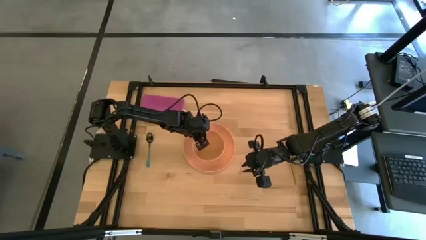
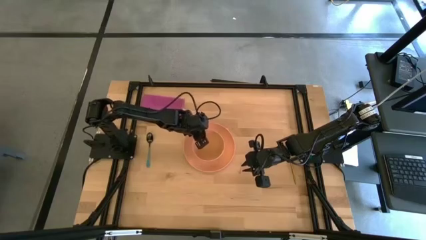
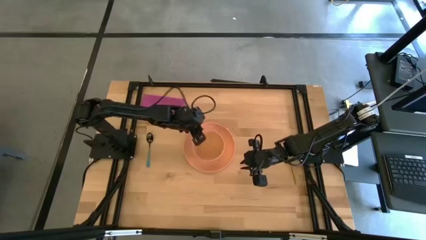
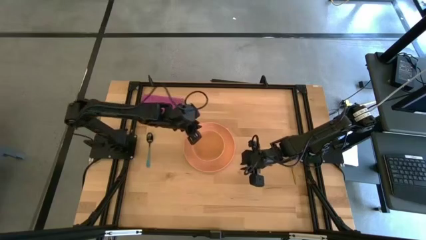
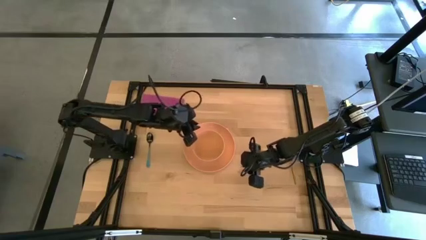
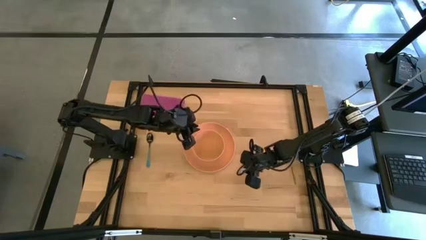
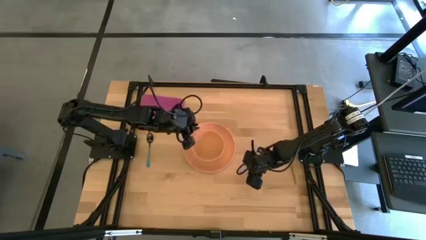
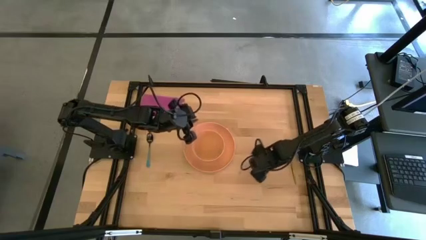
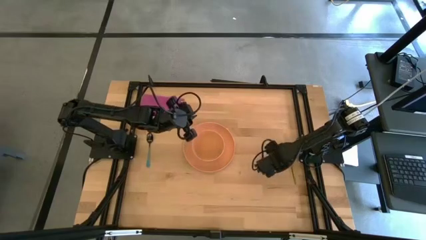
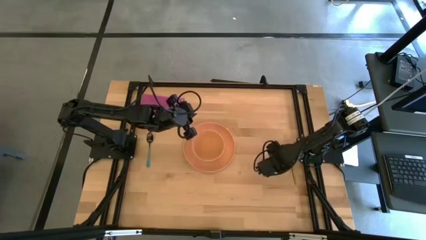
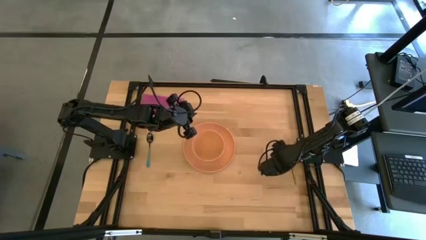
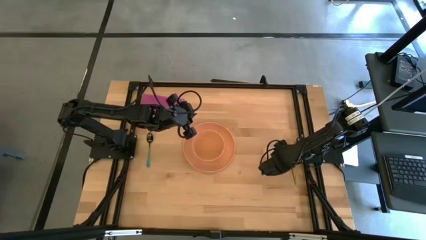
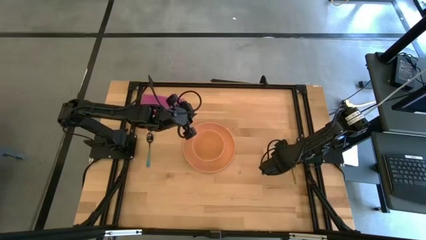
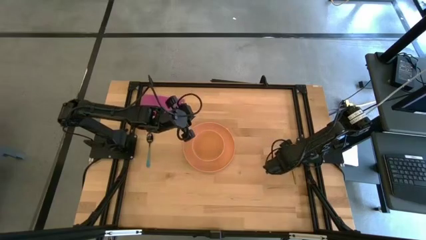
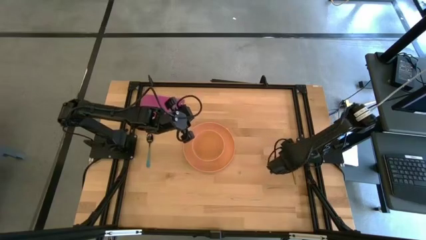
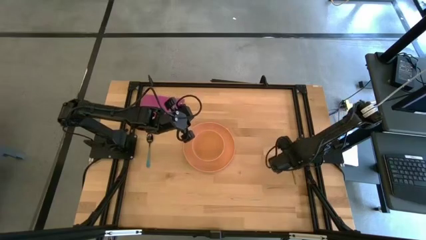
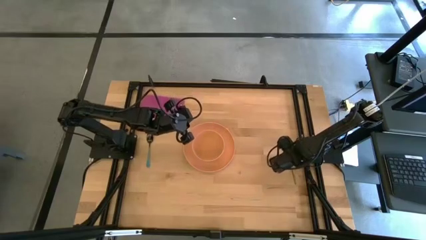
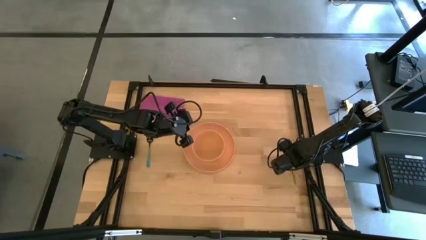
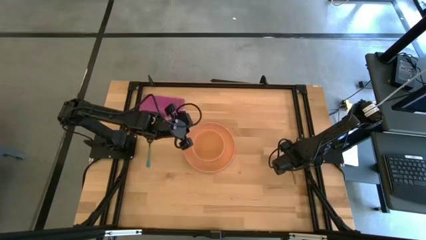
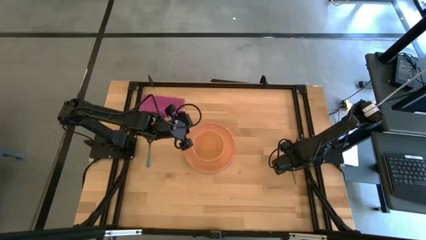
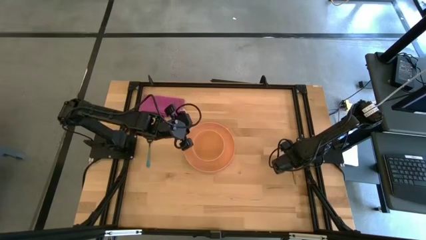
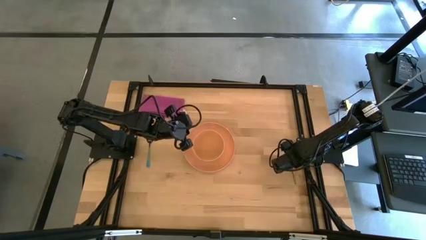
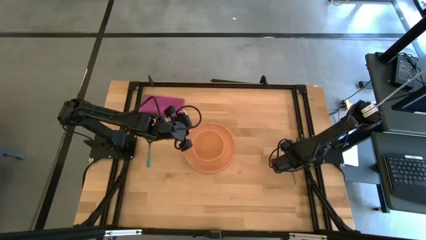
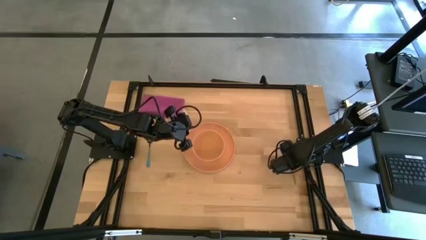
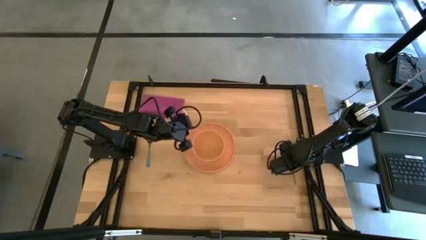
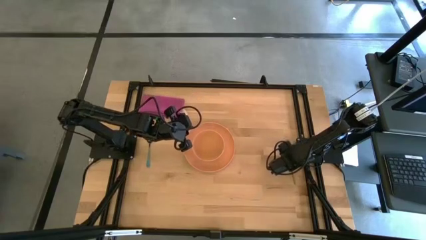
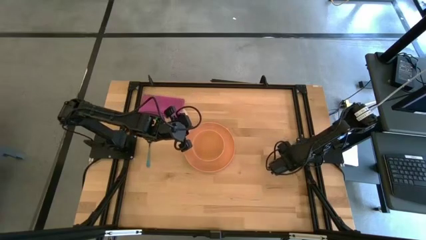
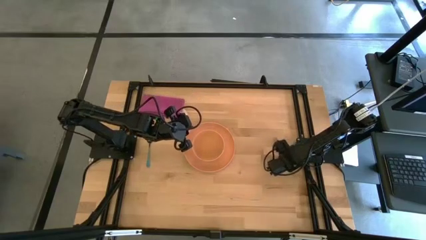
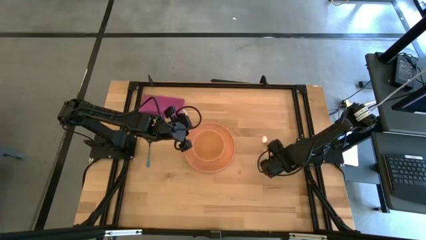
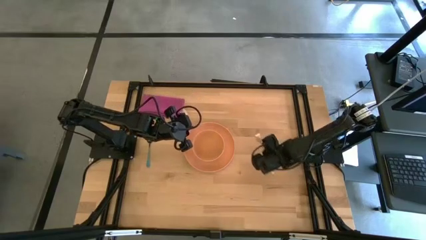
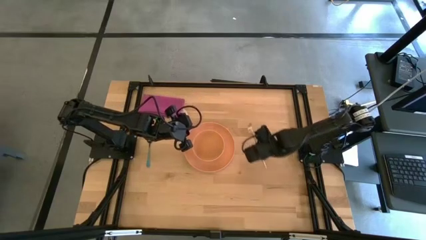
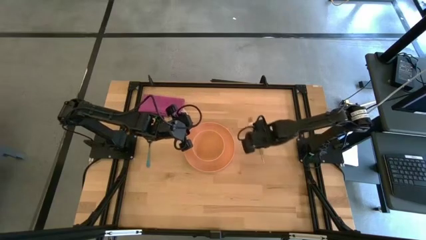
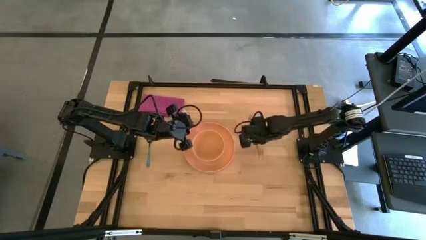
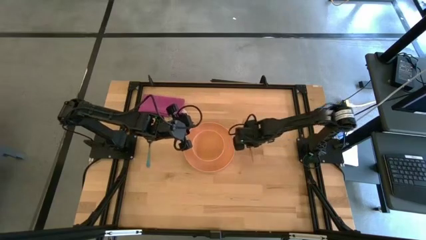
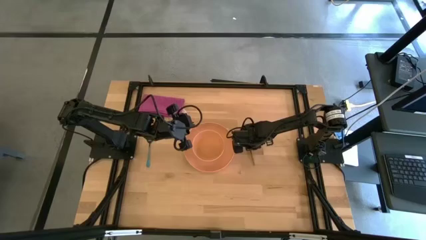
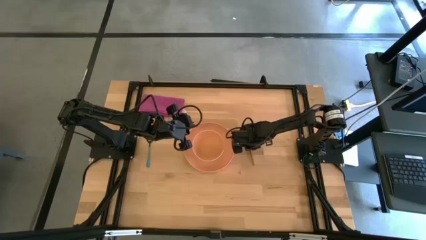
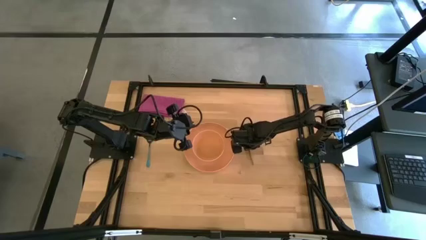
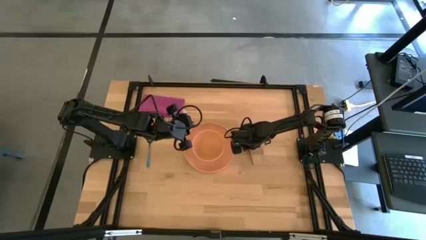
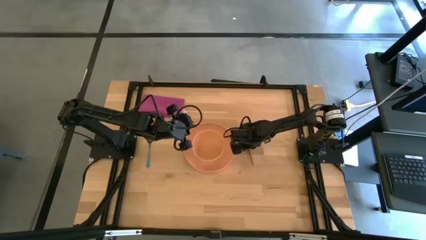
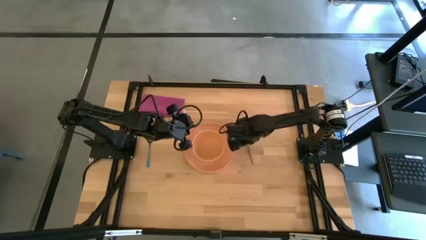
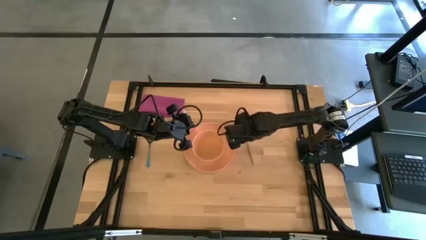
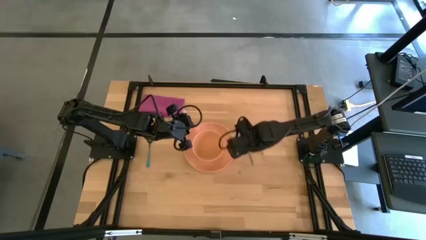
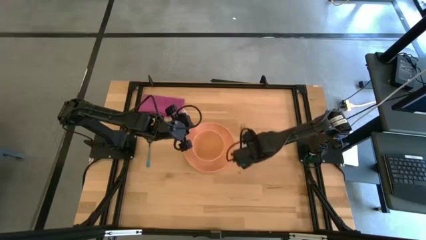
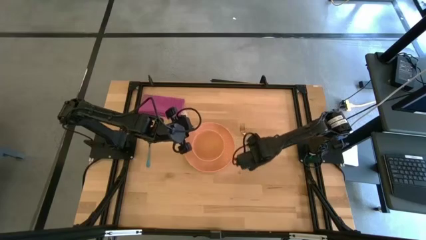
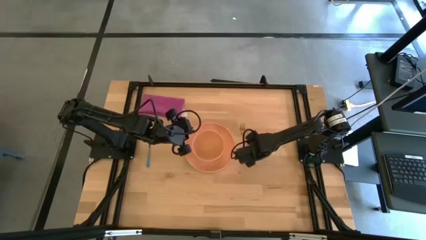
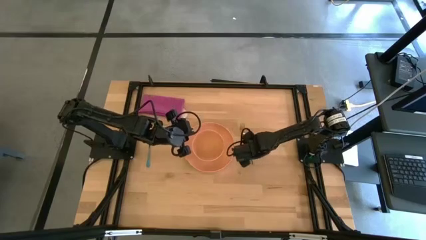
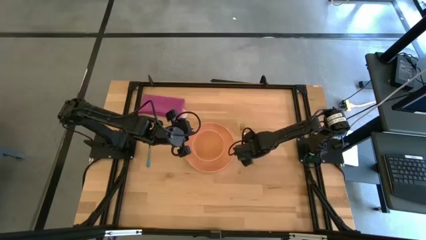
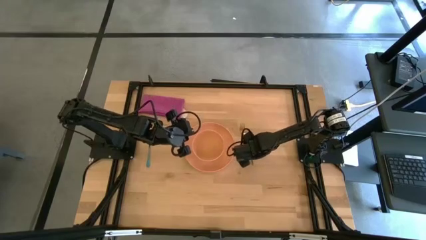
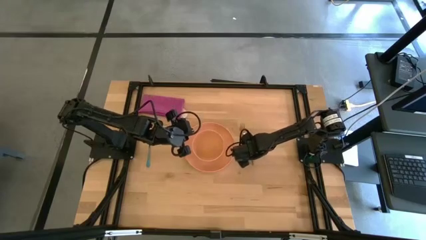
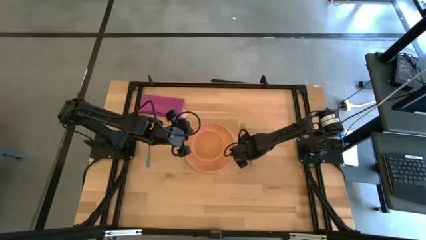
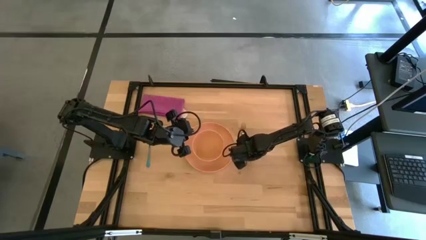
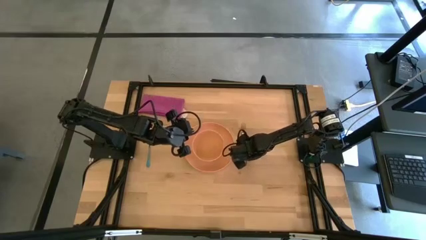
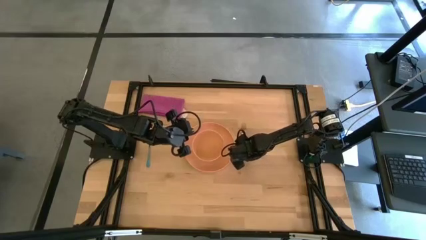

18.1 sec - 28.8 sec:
Task: Set table place
Put the gold fork to the right of the light orange plate

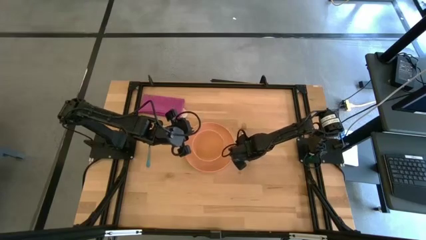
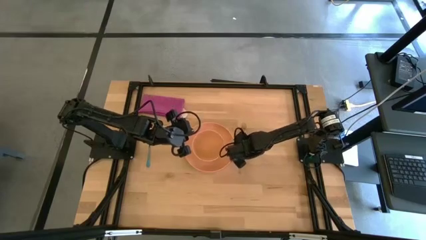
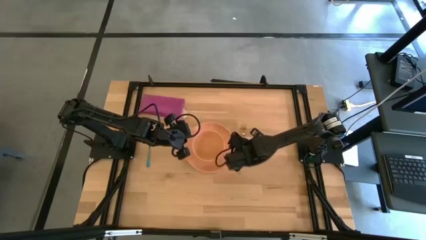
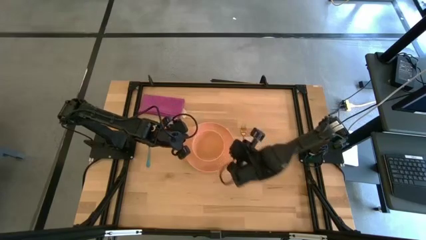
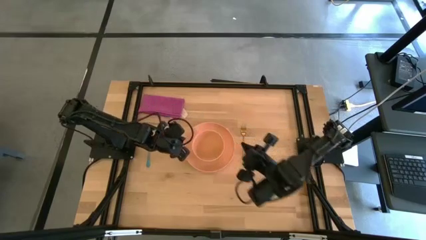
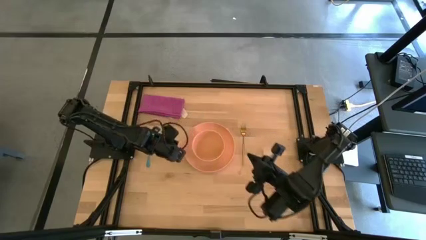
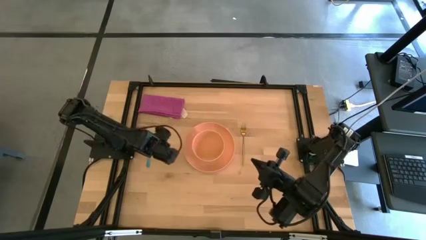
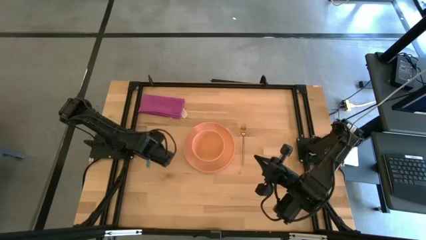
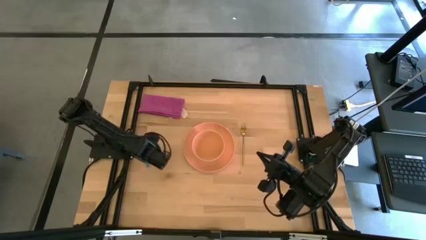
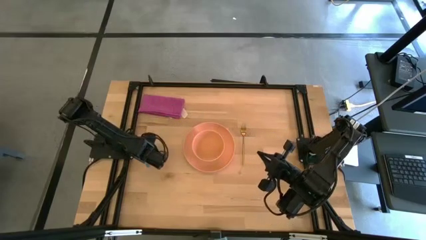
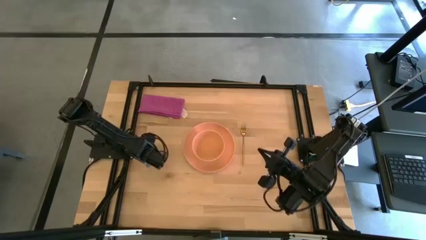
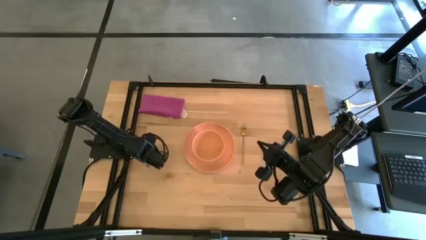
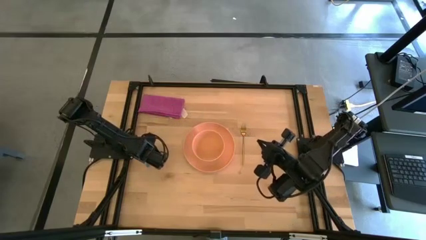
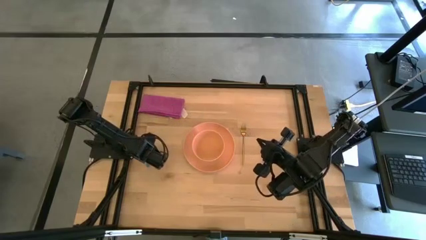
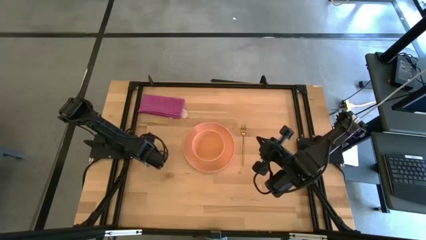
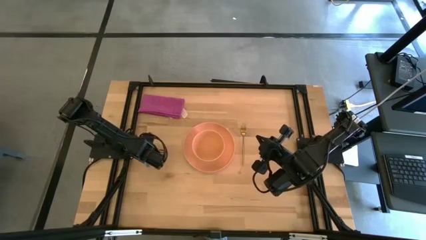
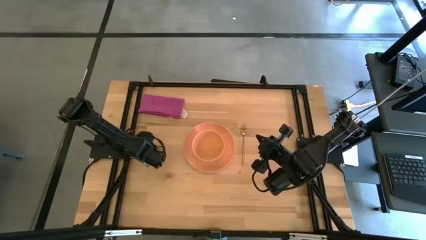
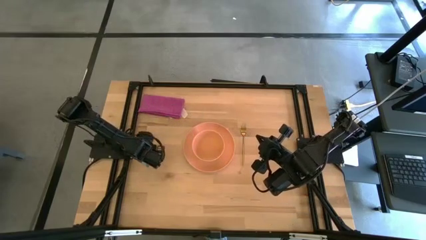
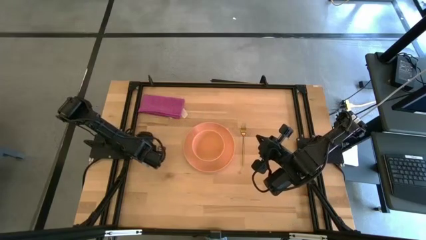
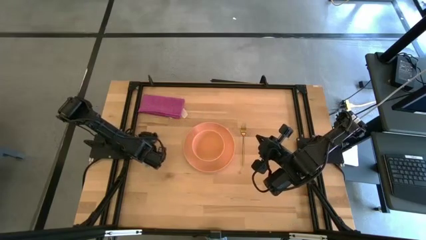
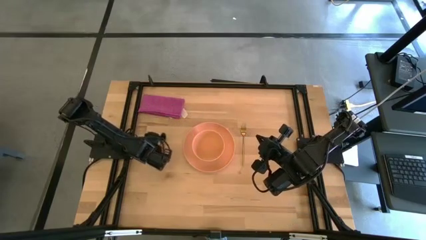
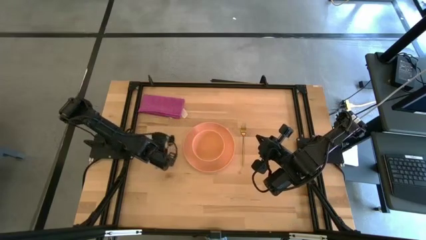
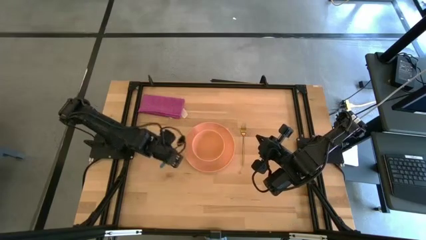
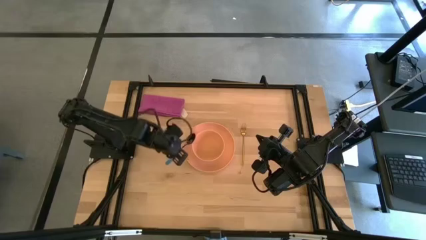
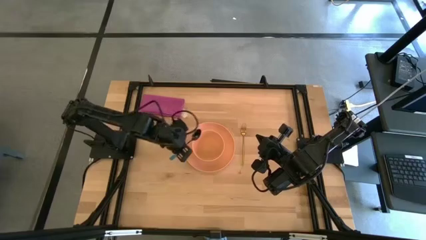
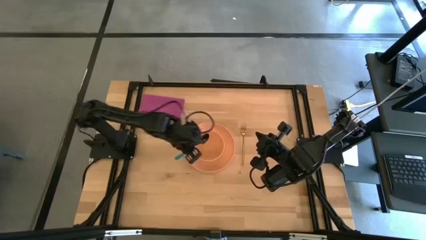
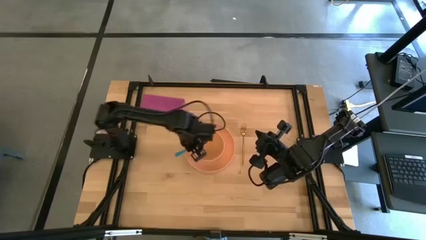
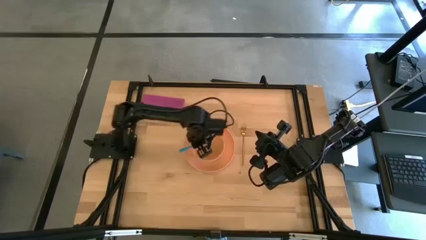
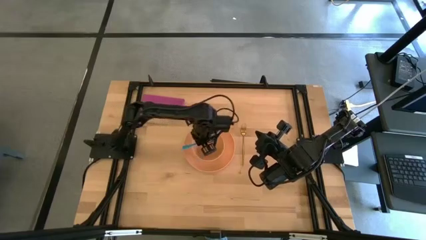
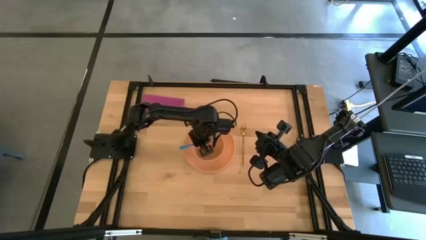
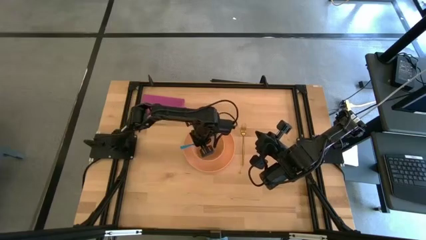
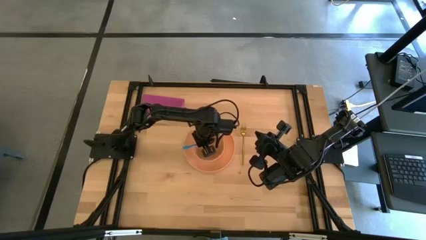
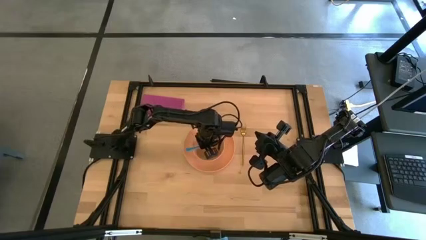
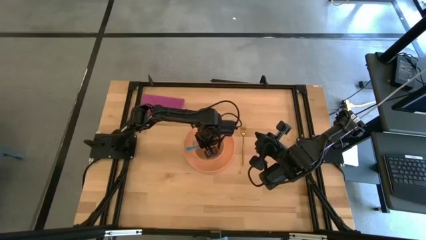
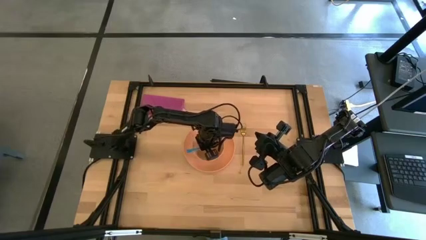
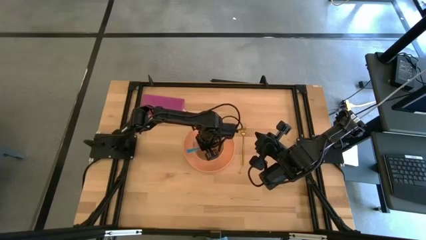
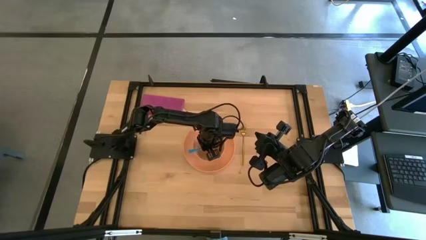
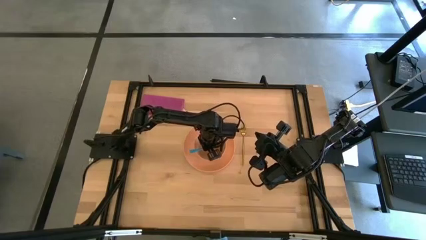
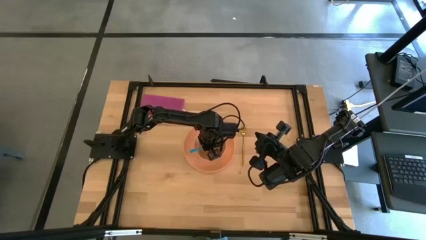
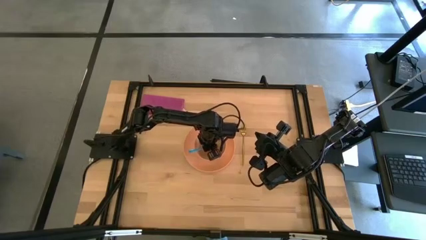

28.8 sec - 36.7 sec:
Put the blue spoon into the light orange bowl
